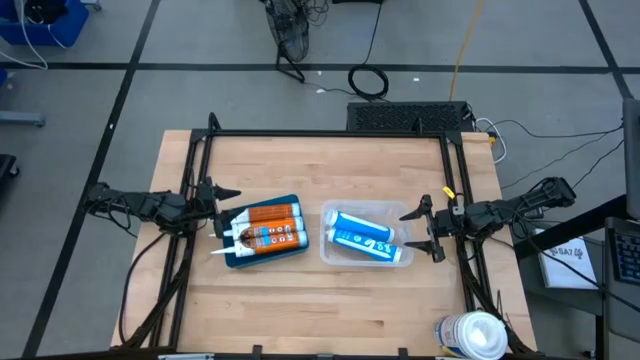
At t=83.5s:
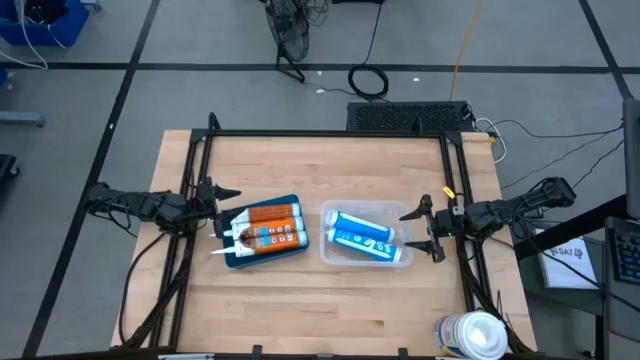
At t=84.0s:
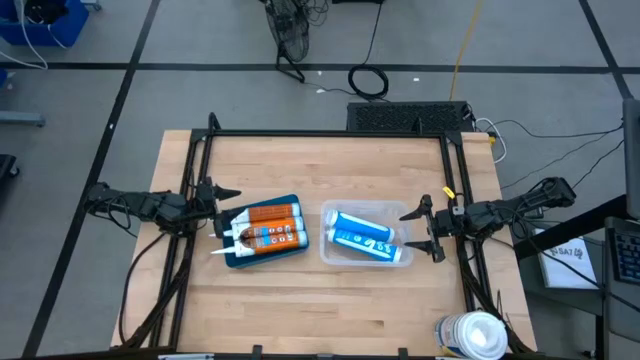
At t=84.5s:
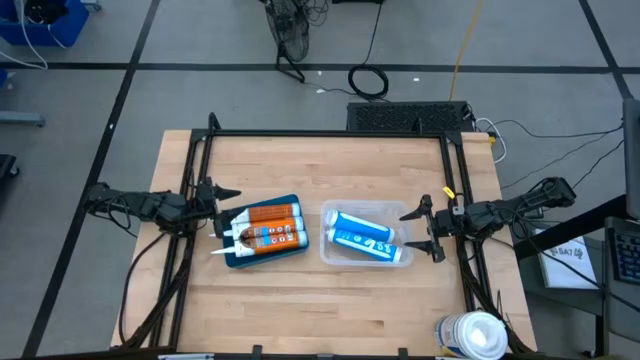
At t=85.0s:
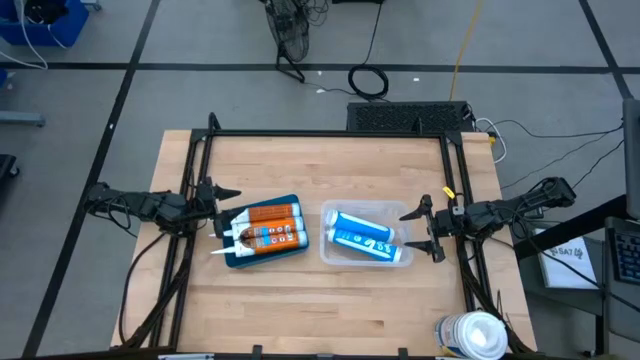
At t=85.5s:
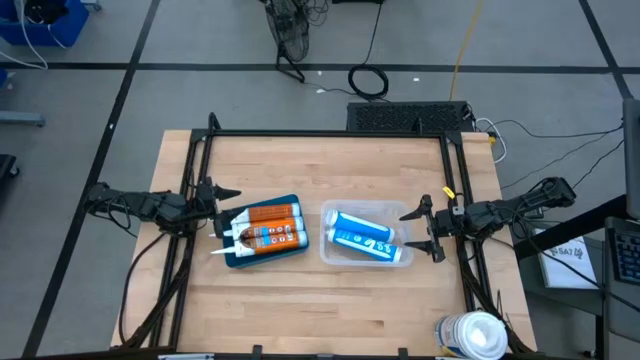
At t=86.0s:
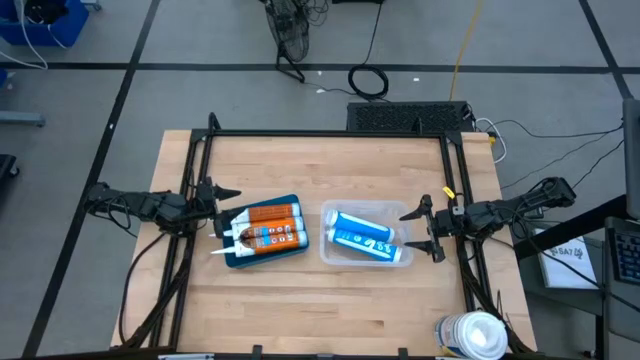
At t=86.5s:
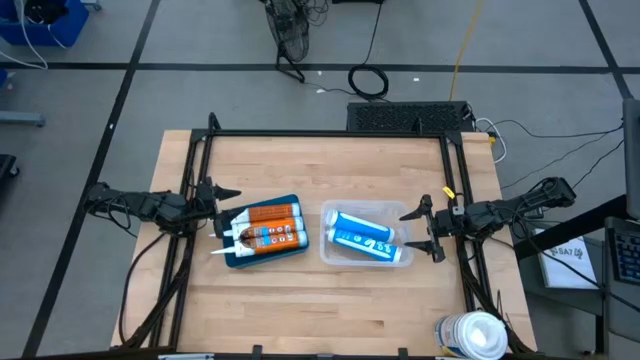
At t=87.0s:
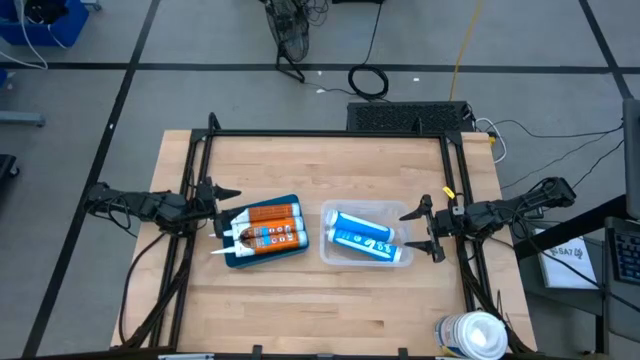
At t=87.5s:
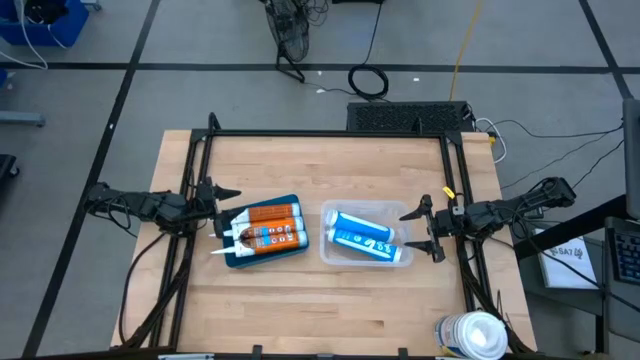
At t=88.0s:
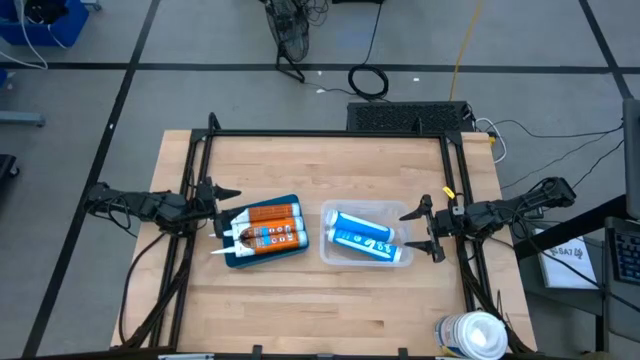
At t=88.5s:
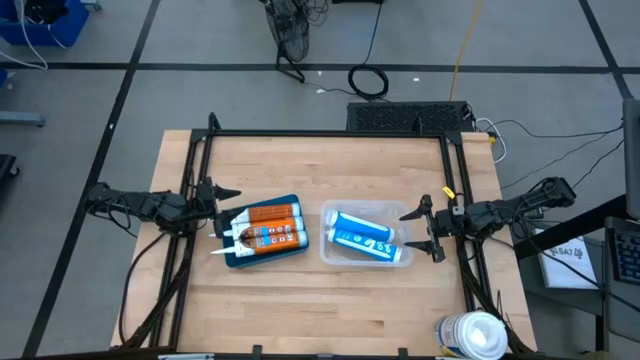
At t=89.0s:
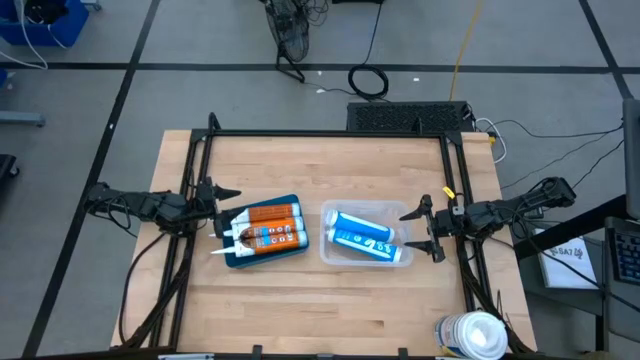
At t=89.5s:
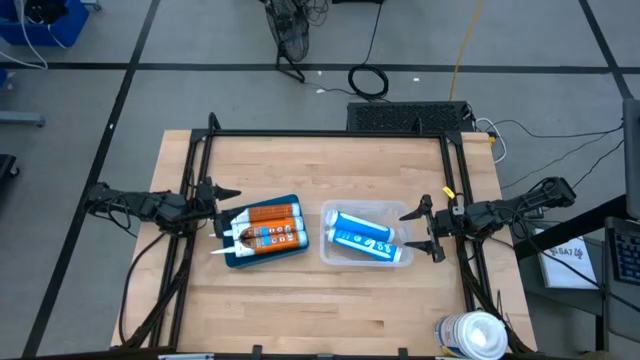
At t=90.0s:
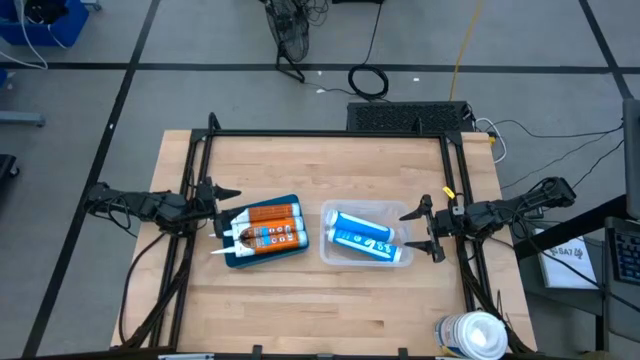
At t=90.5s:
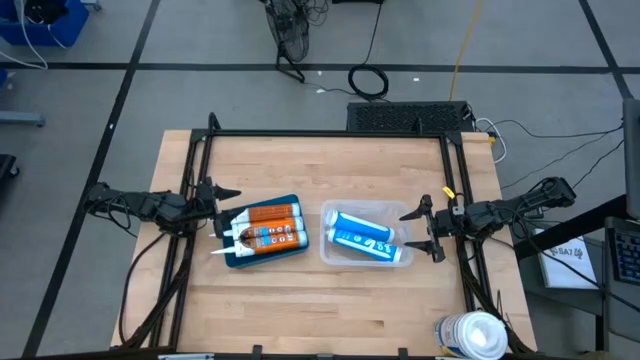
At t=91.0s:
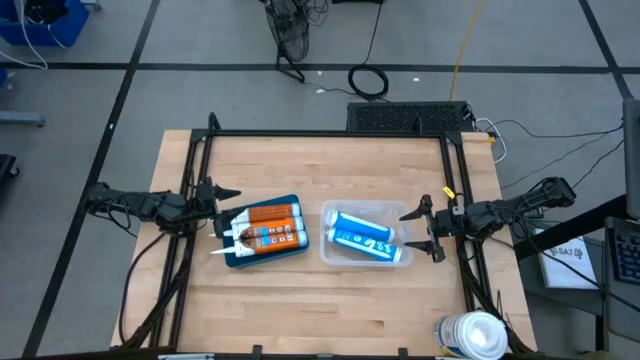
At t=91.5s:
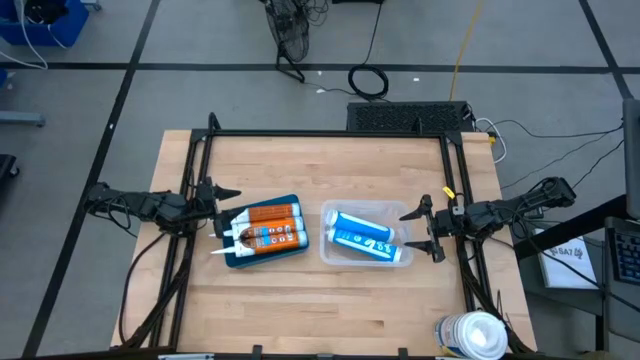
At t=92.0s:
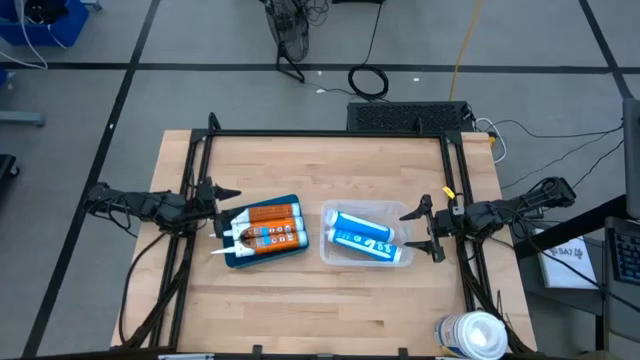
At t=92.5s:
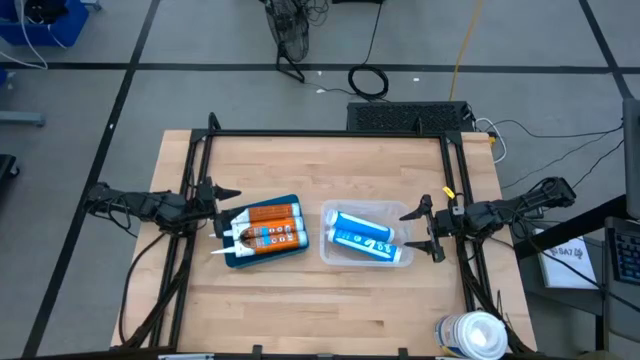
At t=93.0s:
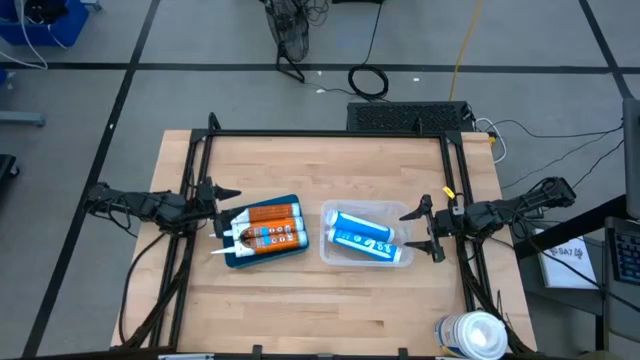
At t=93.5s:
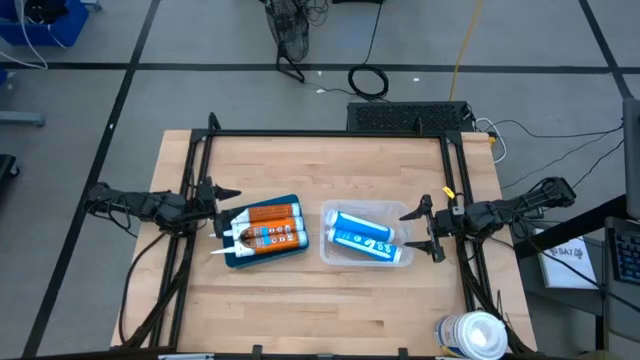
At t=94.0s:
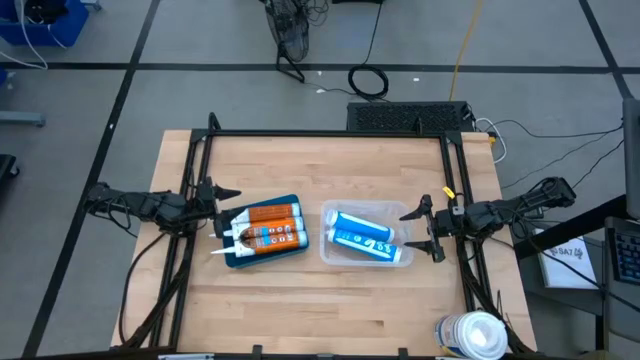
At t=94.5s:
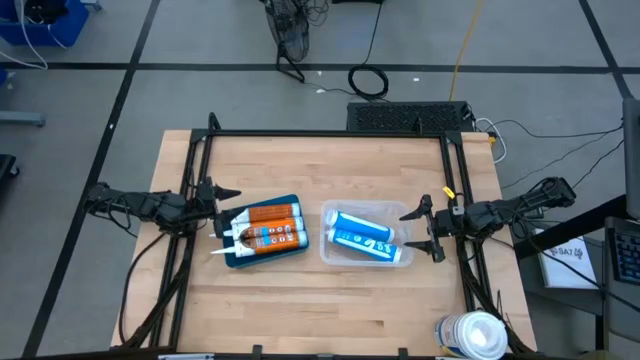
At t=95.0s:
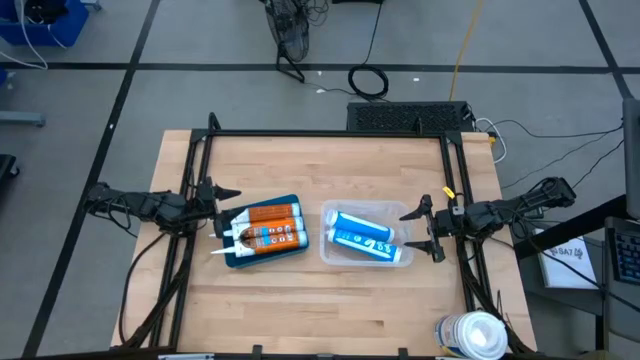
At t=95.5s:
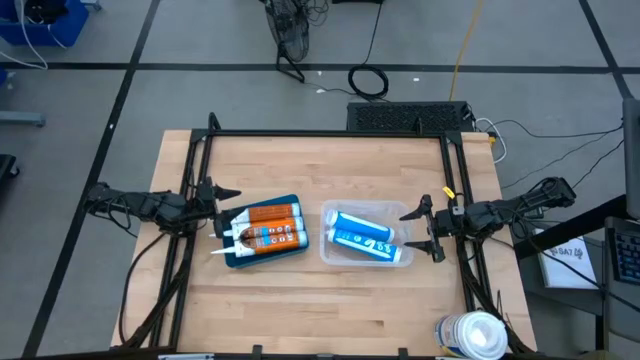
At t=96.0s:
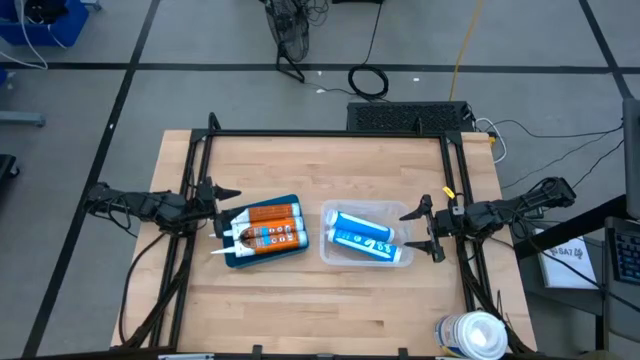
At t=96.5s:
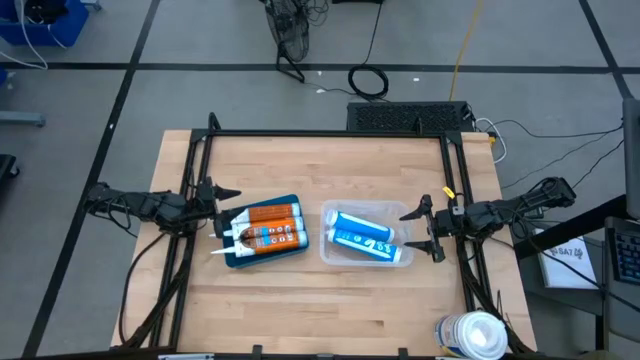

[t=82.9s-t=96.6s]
Task: Pick & place silicon tubes, Sealant and Lysol wipes
Return to Home Position

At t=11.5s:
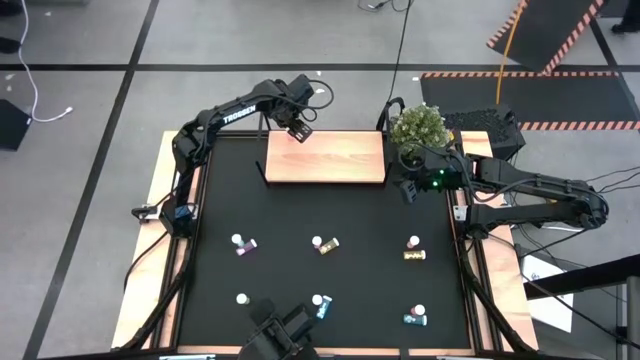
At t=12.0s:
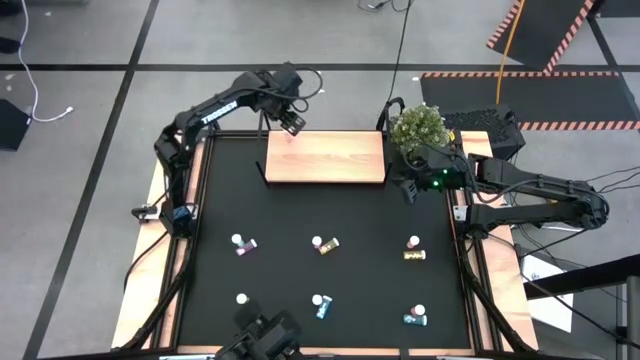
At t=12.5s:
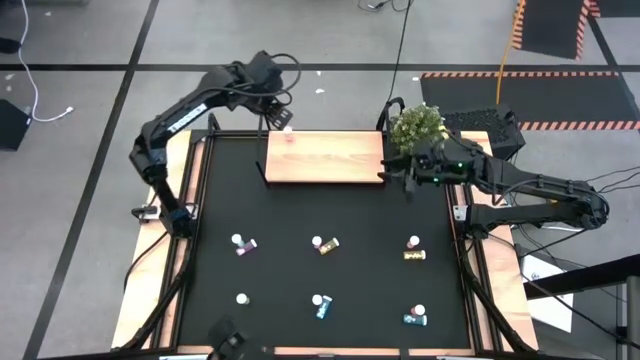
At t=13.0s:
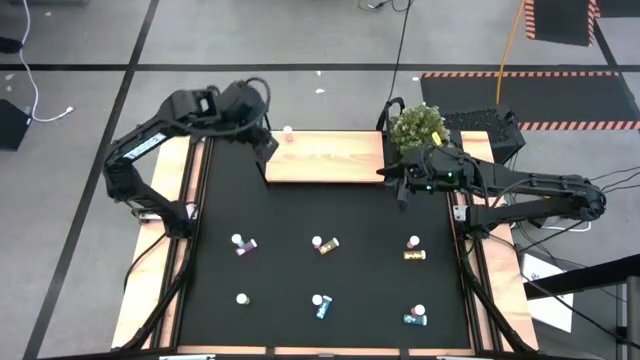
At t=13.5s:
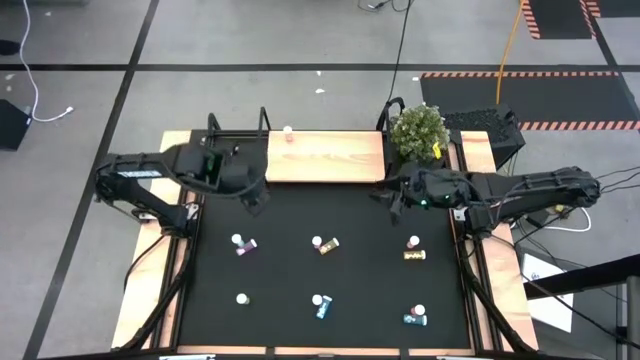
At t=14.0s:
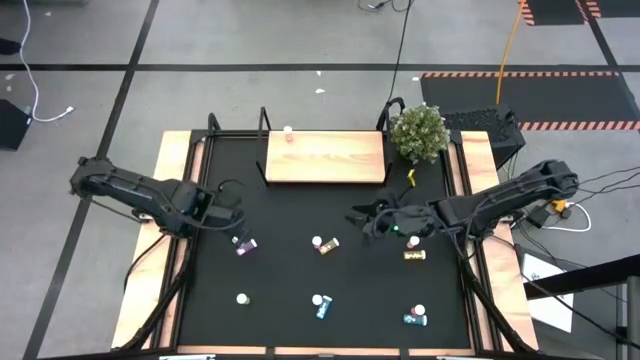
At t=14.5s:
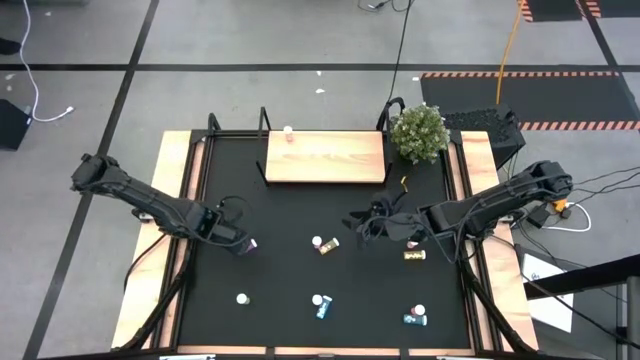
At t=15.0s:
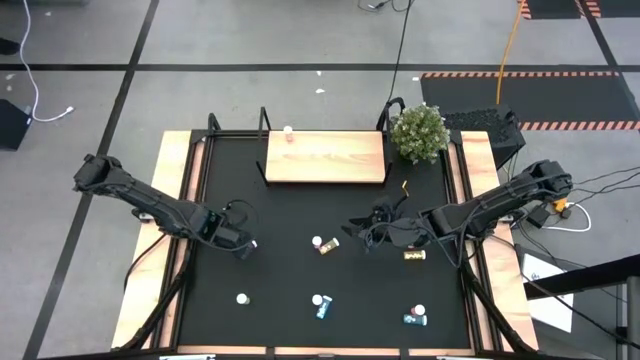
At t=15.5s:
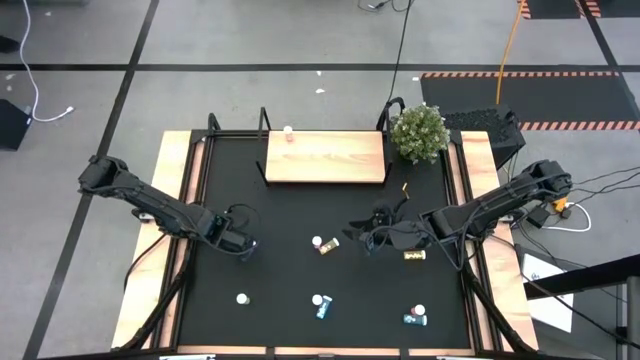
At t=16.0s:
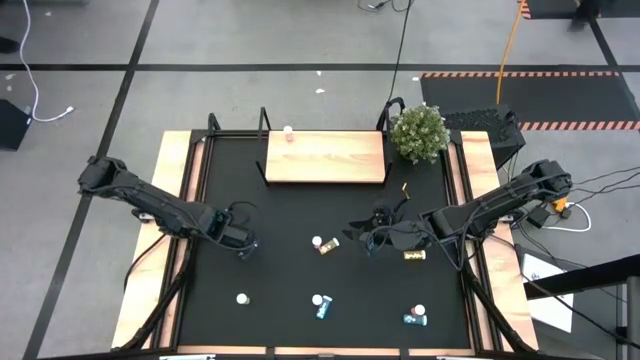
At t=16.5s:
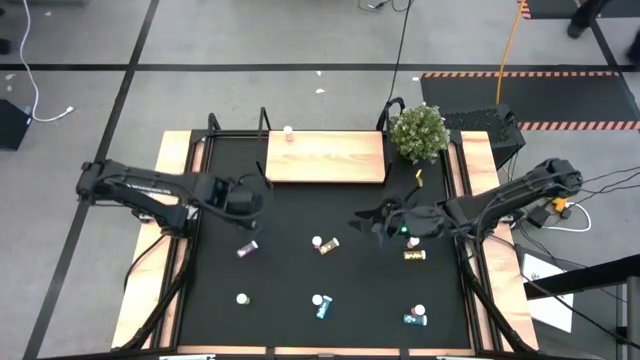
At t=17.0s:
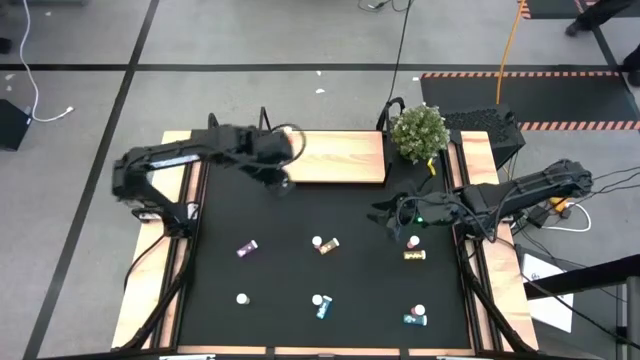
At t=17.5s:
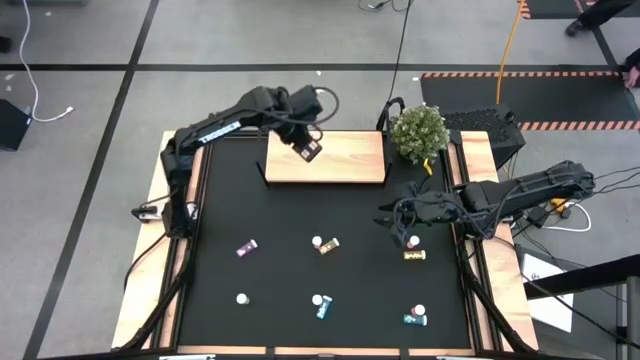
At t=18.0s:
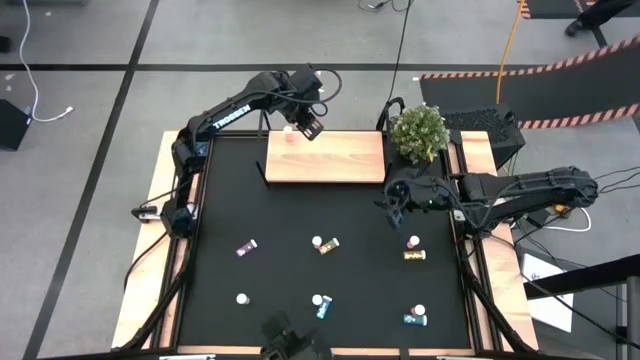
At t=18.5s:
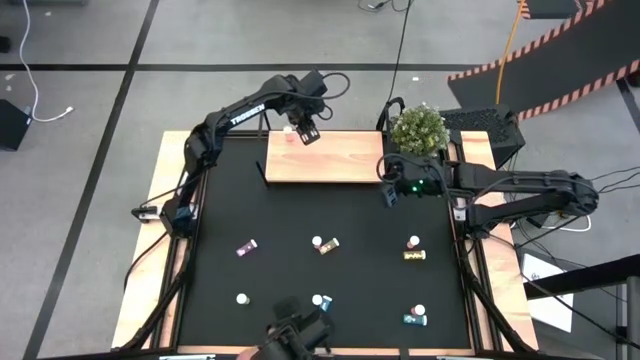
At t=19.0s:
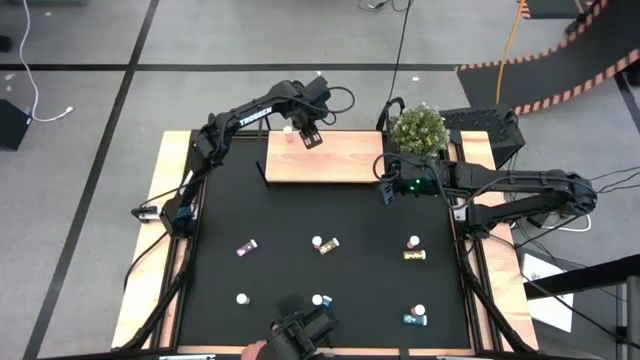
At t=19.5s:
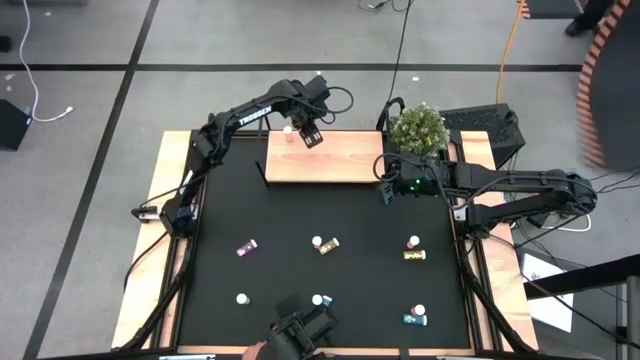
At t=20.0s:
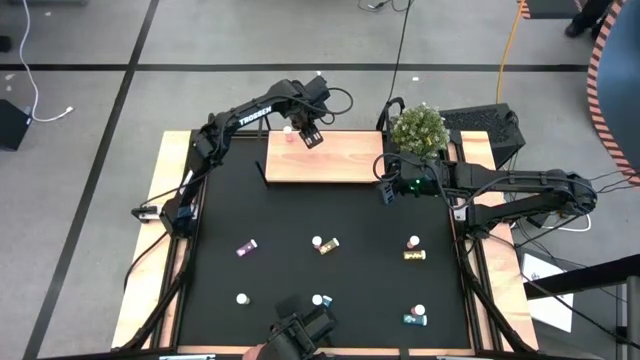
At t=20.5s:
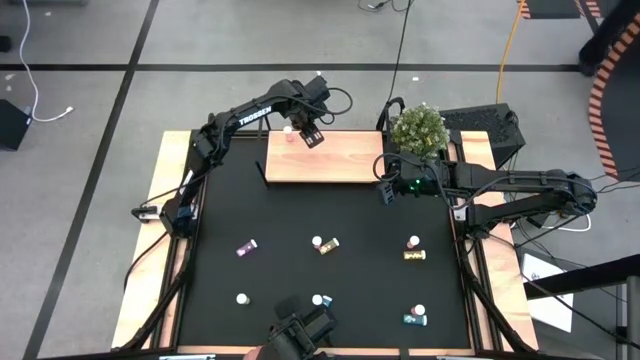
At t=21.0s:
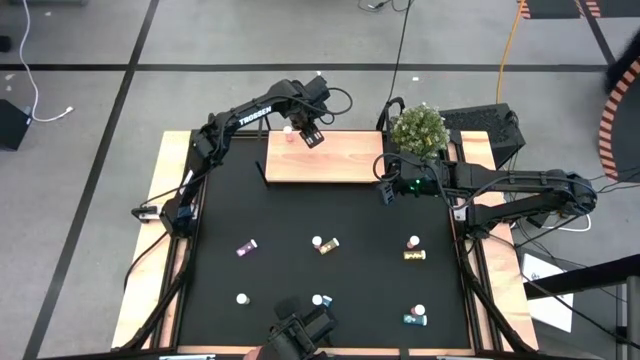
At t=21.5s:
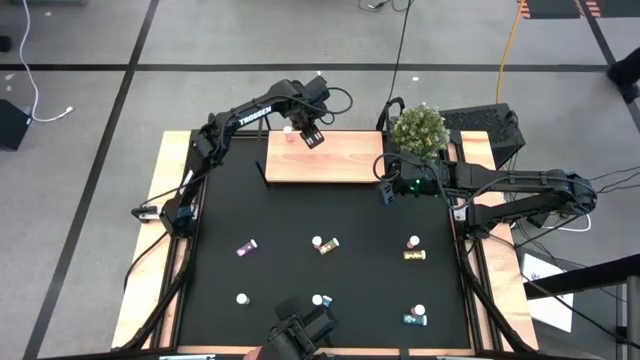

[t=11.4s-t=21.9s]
Task: Pick and place medicine bottles onto shelf by color
Put the top blue pill bottle on the shelf
